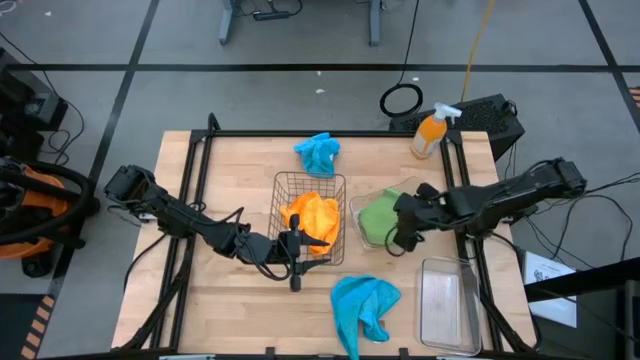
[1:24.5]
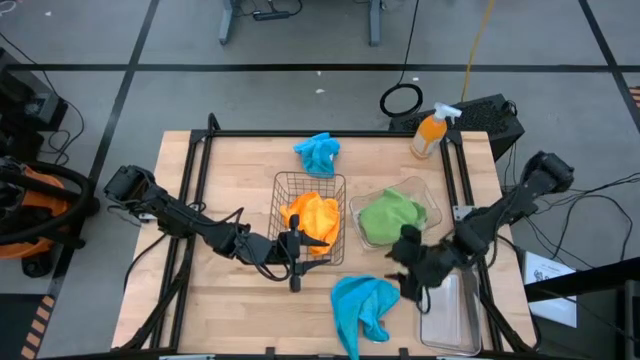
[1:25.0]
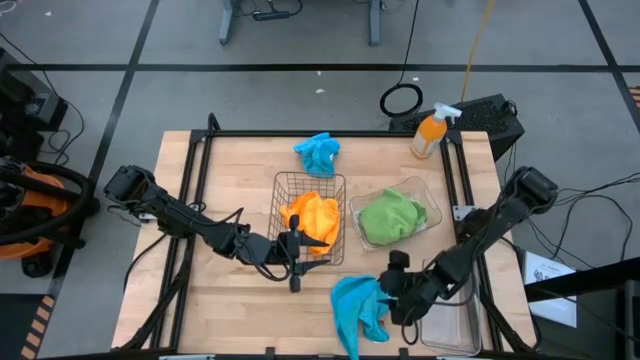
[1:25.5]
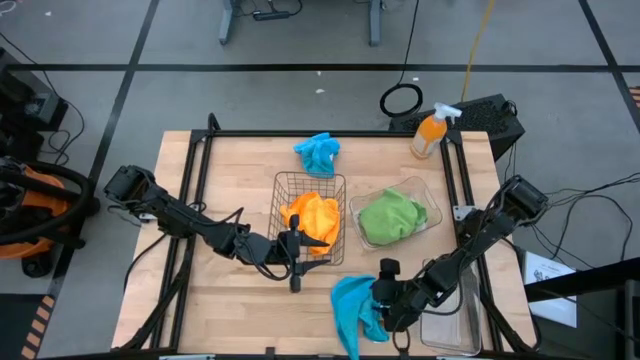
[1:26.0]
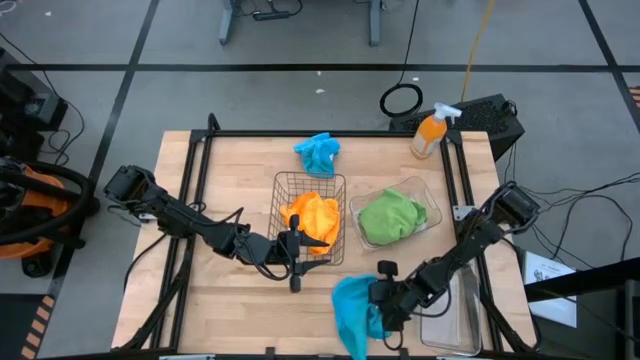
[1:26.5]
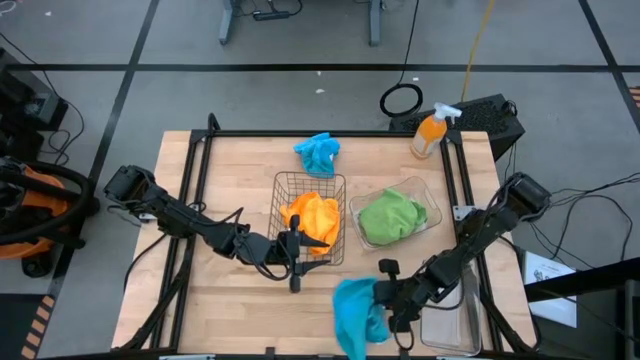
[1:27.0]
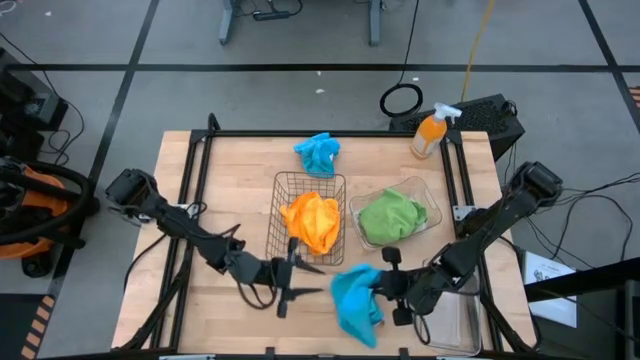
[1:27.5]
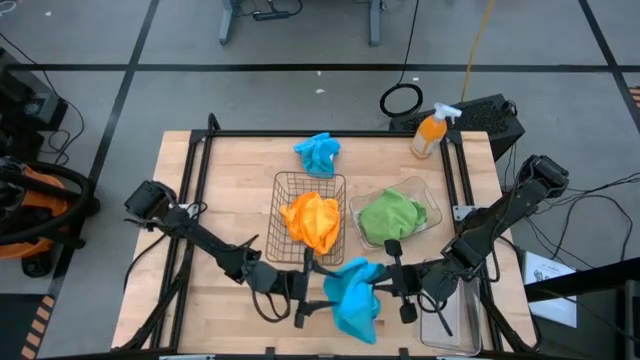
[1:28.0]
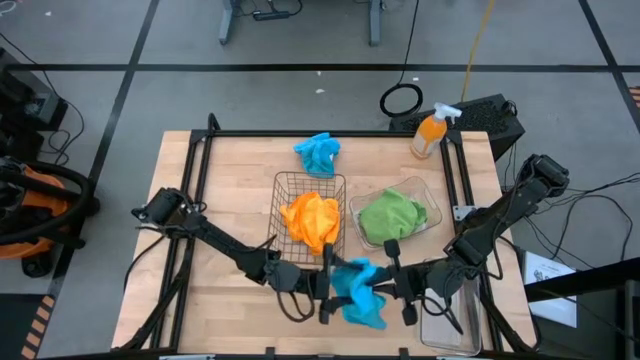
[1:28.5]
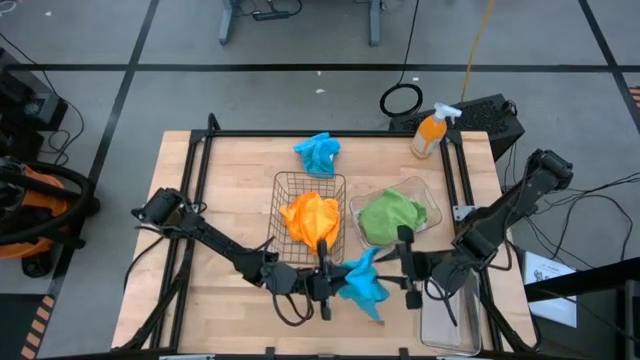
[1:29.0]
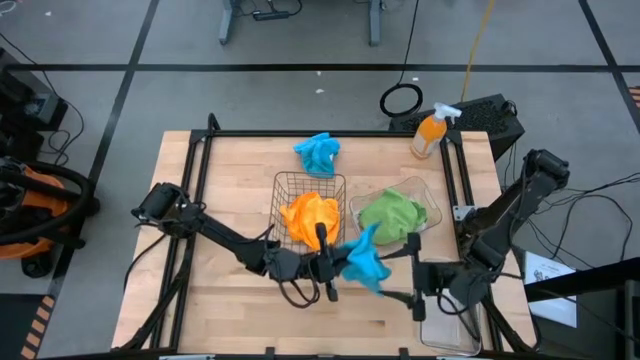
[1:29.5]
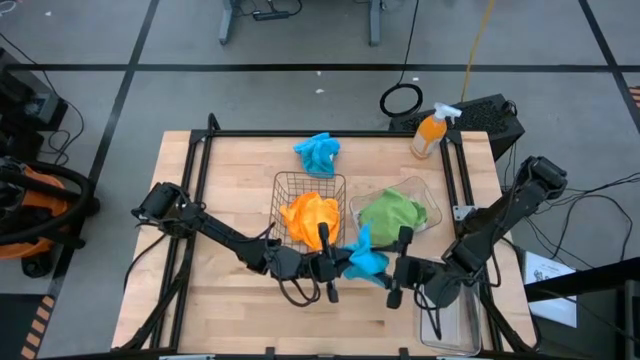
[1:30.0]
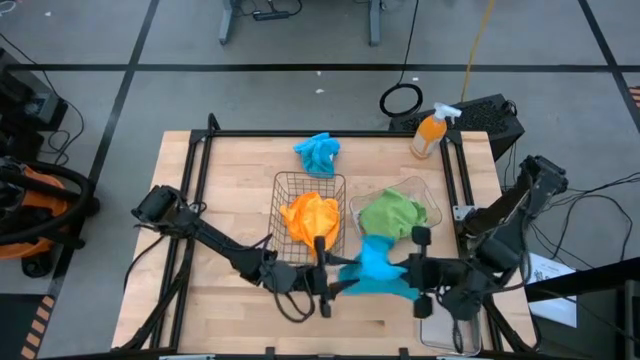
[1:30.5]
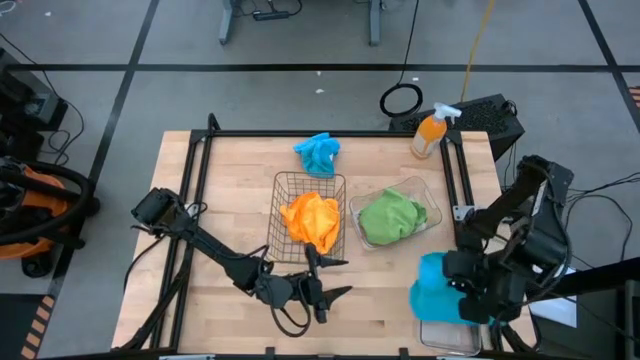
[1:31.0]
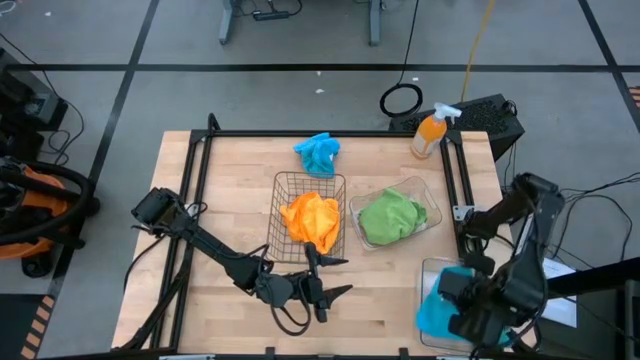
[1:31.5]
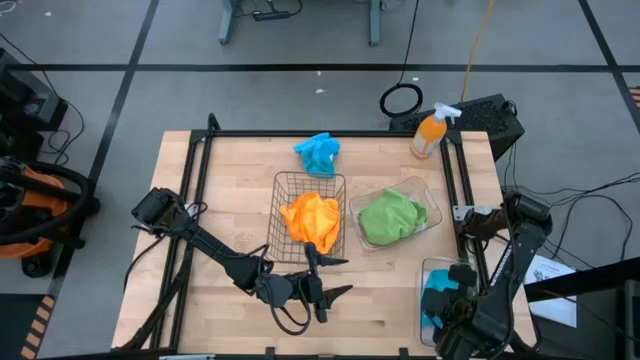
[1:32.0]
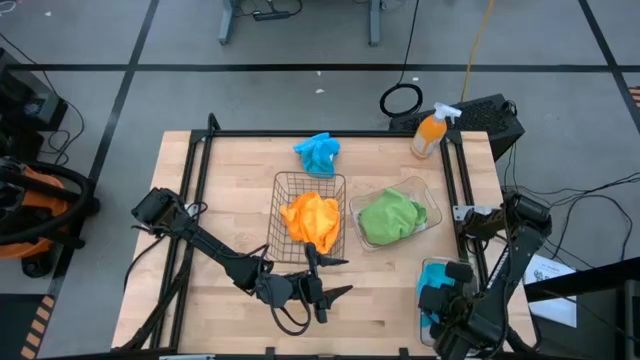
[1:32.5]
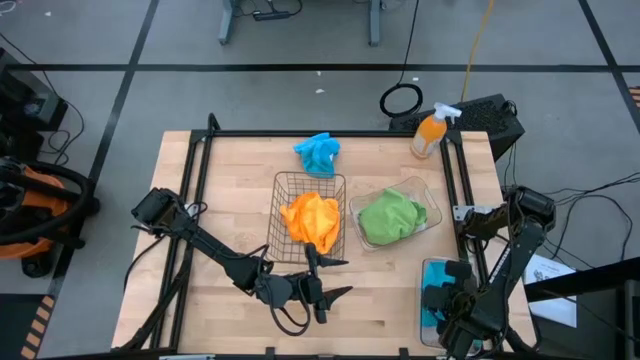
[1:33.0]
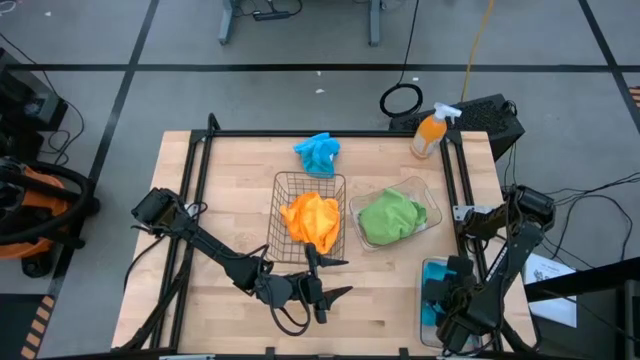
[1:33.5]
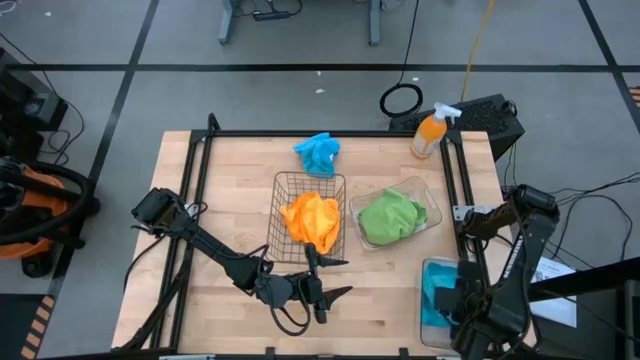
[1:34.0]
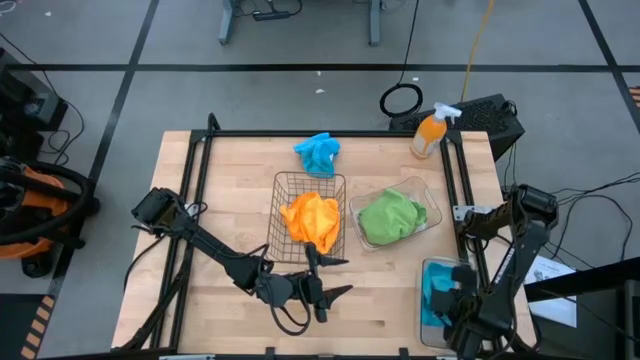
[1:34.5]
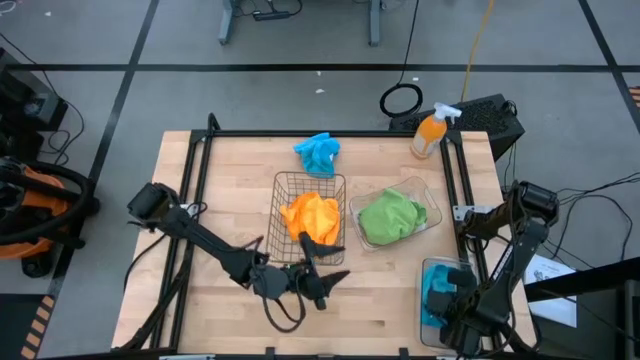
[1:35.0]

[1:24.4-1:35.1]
Task: Sort microfiber towel by color & place in baskets
Put the bottom blue towel into the bottom transparent bin

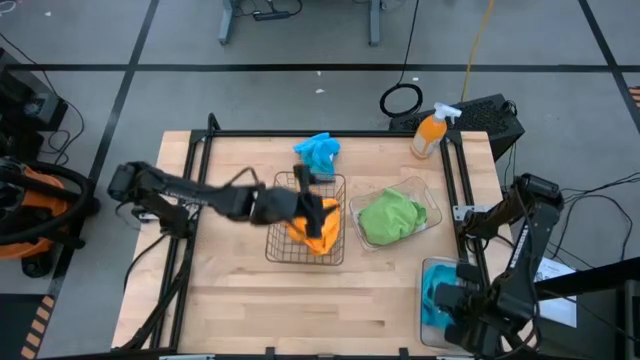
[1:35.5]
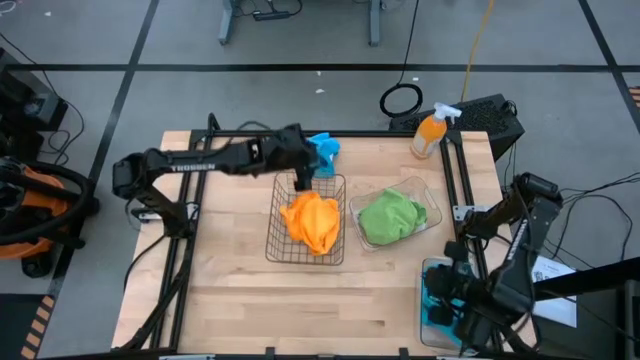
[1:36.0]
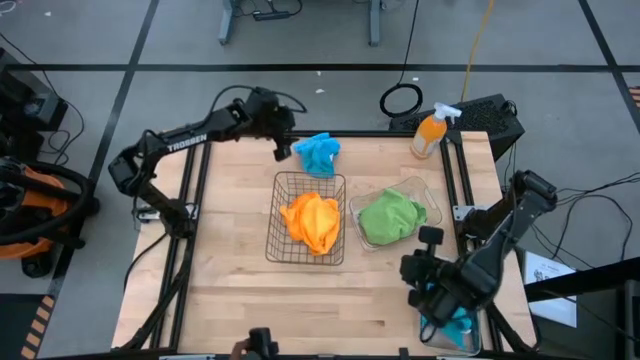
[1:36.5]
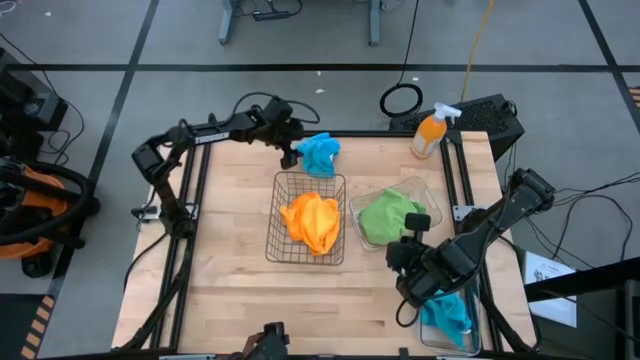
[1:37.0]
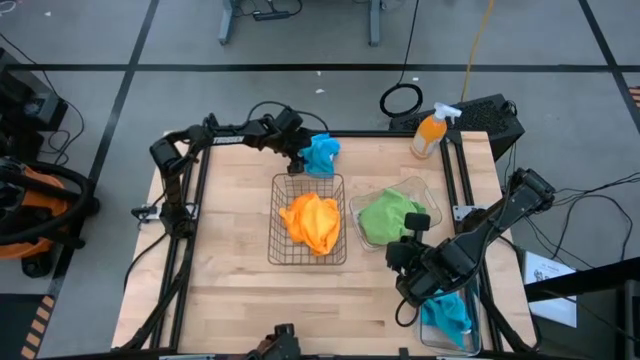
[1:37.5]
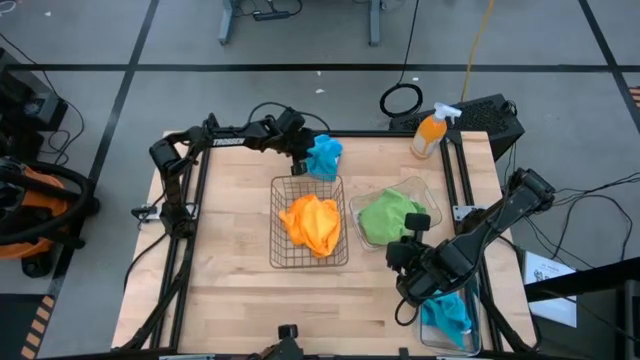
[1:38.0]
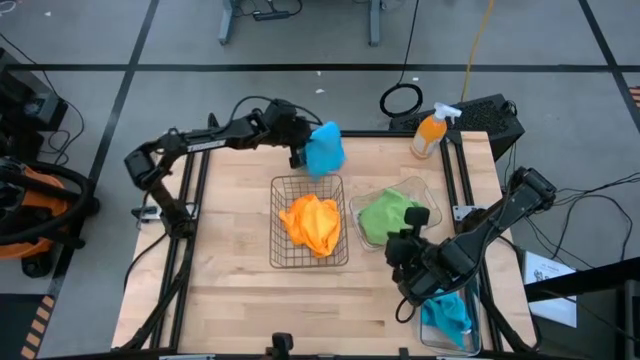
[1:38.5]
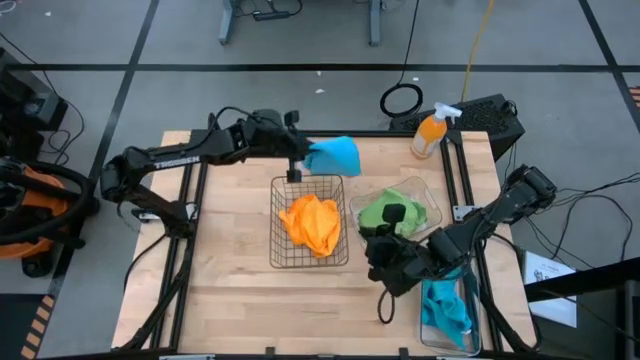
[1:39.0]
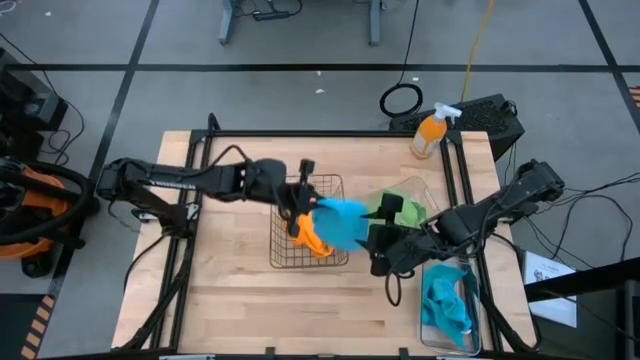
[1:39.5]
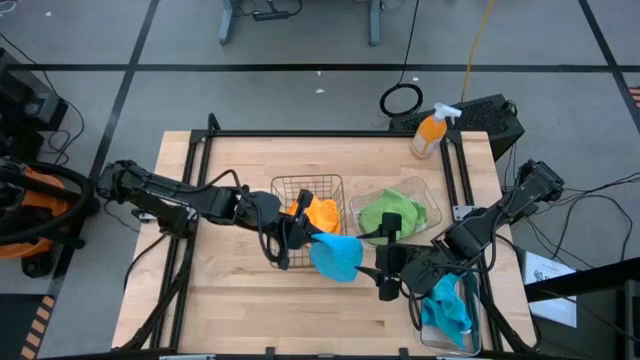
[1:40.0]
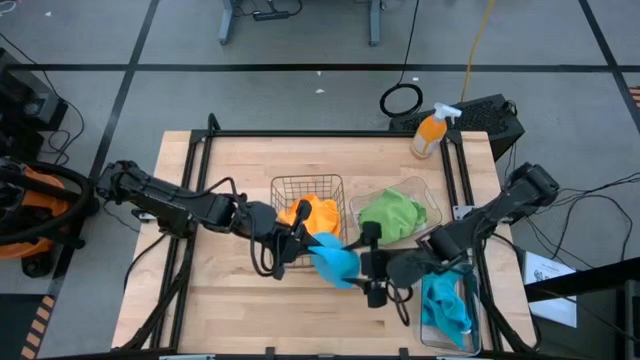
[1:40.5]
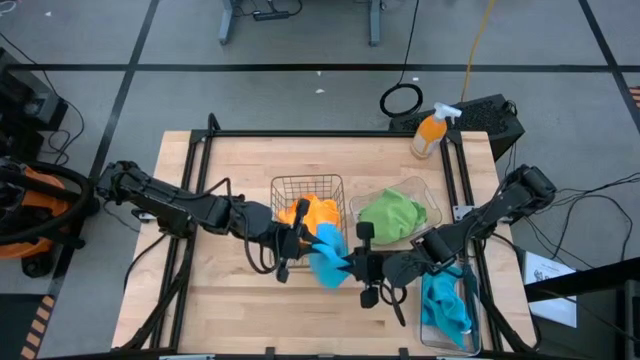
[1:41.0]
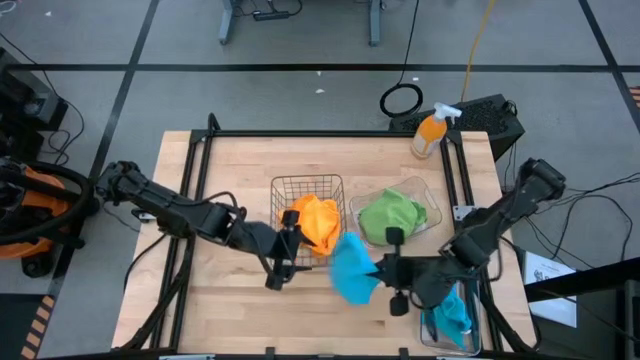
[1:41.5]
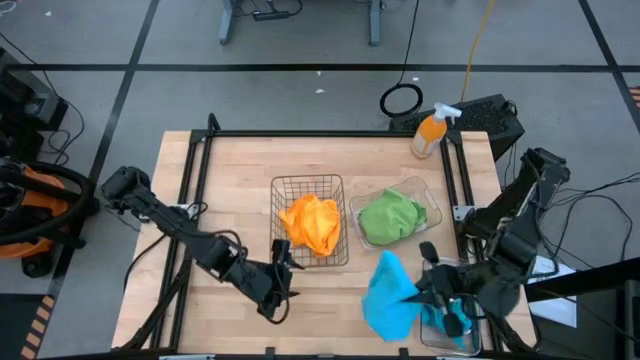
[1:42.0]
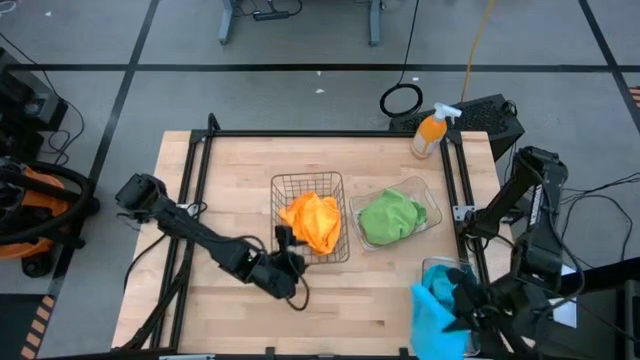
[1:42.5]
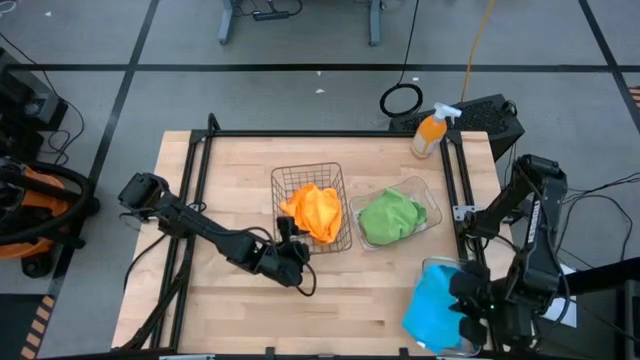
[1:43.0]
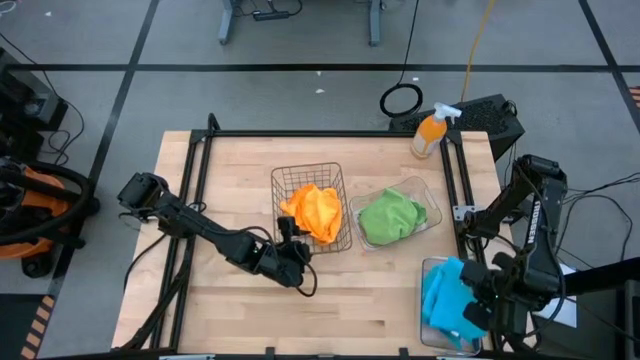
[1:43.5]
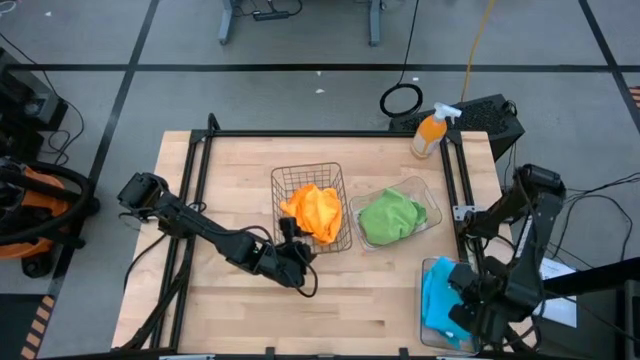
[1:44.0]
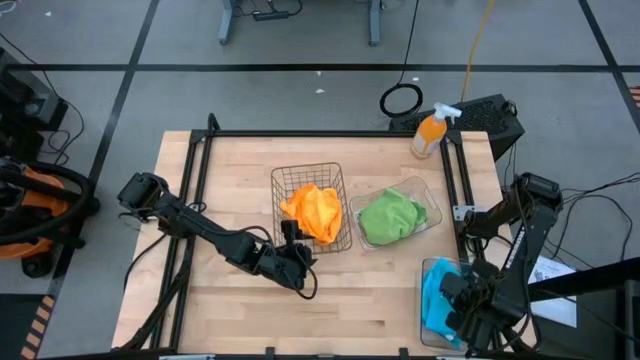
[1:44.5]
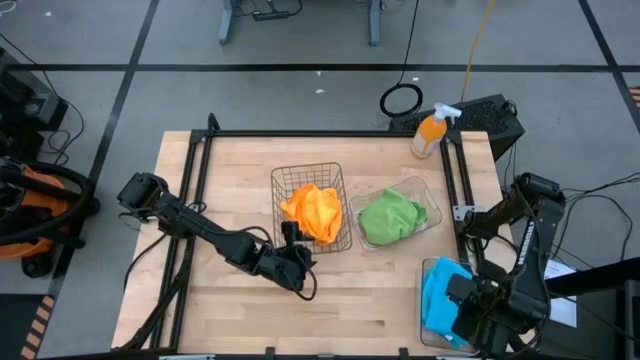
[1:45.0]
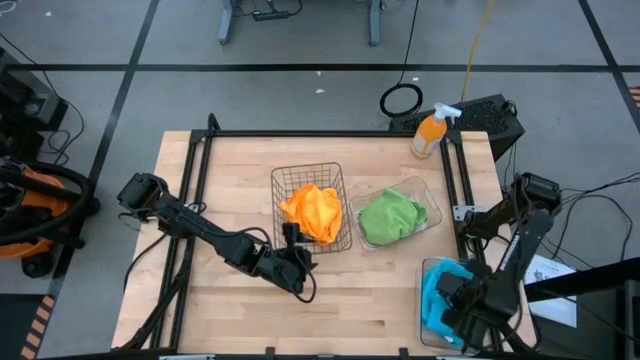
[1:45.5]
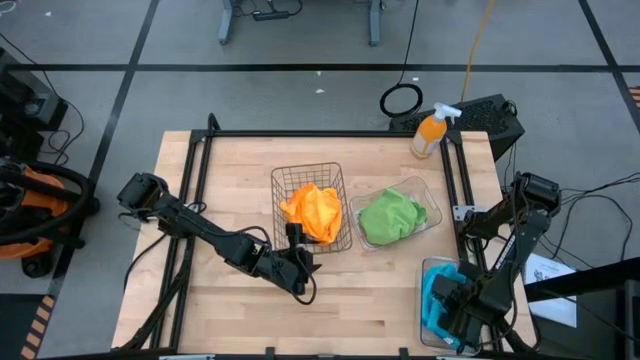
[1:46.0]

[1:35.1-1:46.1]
Put the blue towel into the bottom transparent bin
